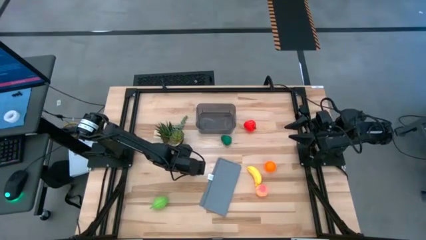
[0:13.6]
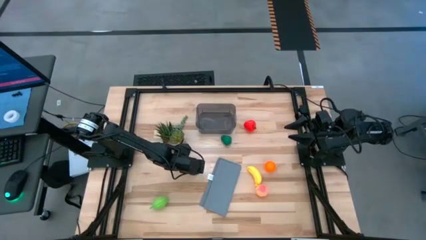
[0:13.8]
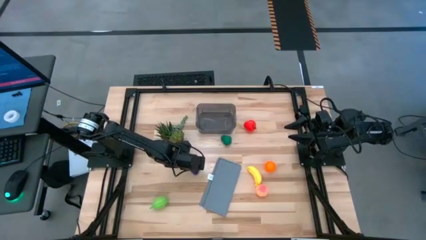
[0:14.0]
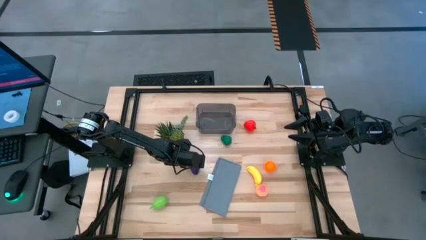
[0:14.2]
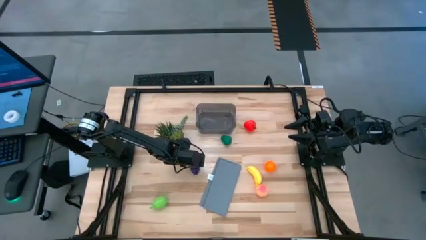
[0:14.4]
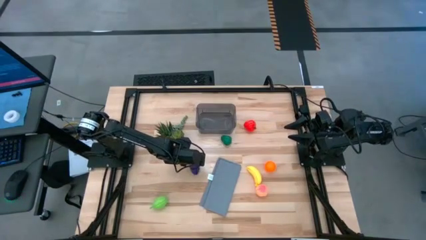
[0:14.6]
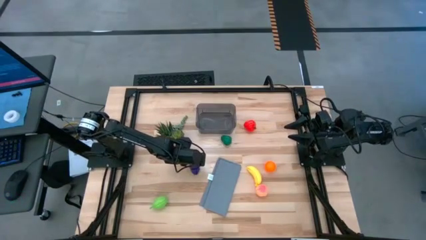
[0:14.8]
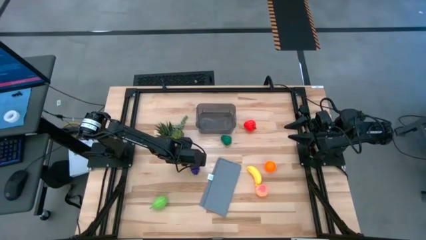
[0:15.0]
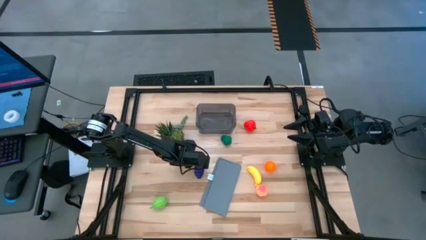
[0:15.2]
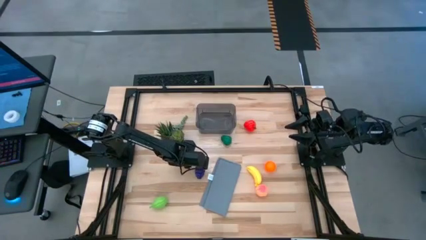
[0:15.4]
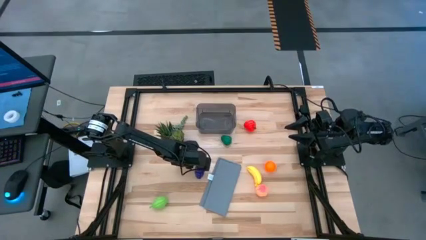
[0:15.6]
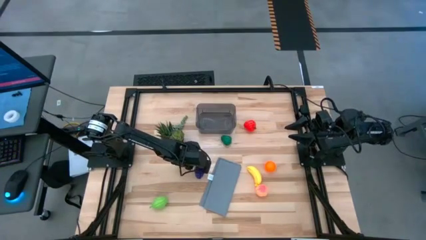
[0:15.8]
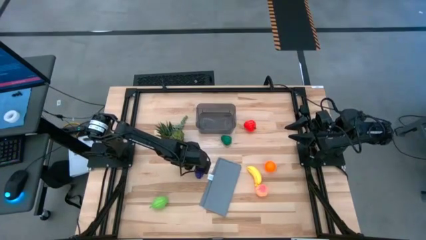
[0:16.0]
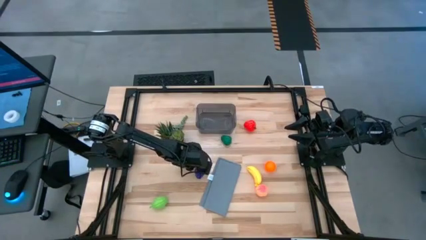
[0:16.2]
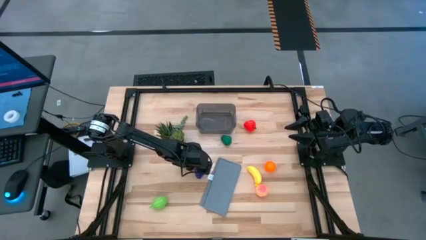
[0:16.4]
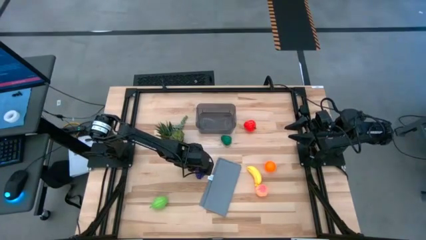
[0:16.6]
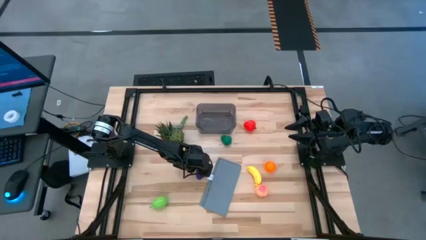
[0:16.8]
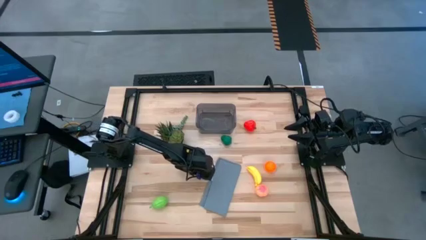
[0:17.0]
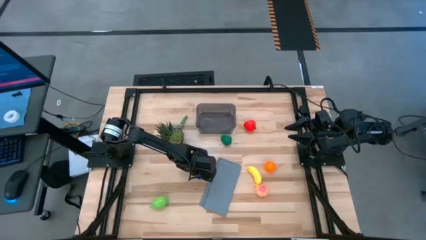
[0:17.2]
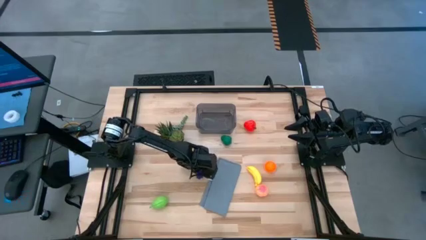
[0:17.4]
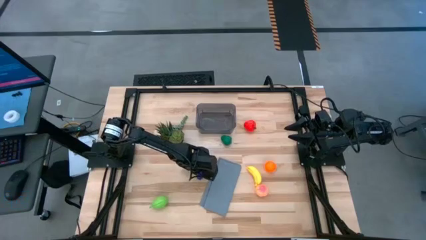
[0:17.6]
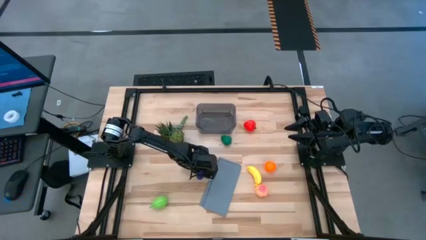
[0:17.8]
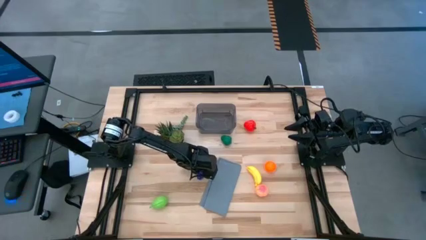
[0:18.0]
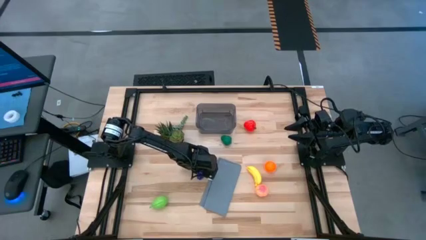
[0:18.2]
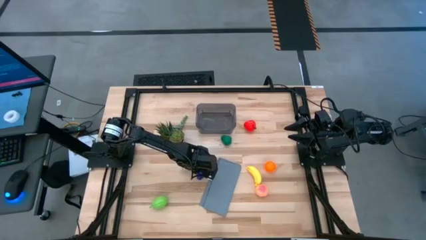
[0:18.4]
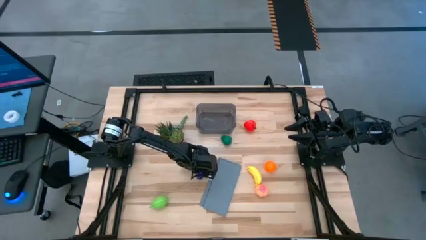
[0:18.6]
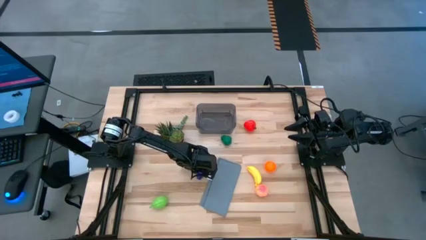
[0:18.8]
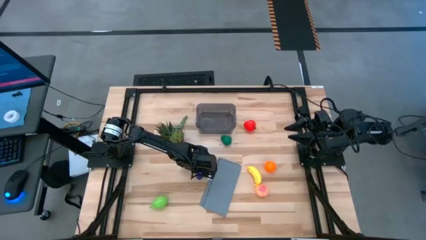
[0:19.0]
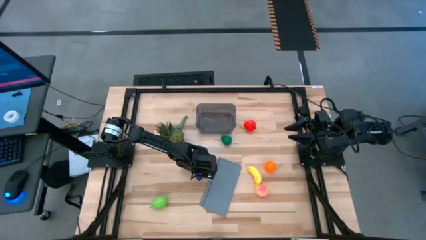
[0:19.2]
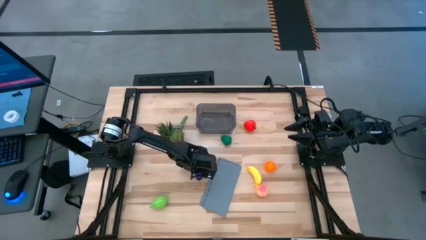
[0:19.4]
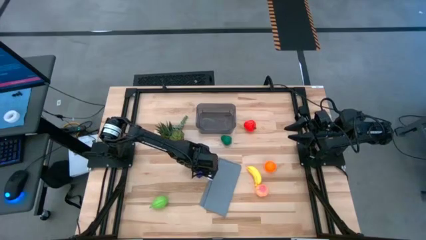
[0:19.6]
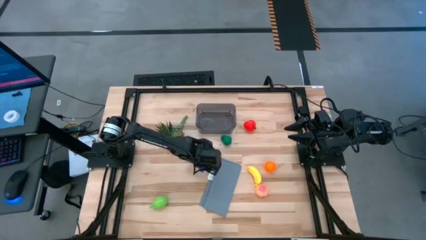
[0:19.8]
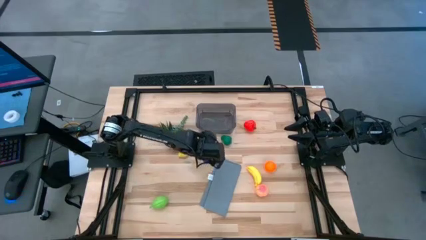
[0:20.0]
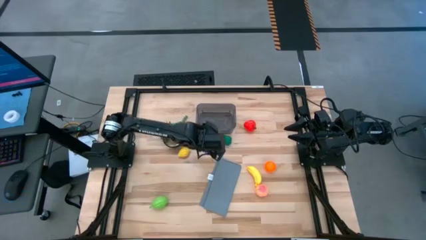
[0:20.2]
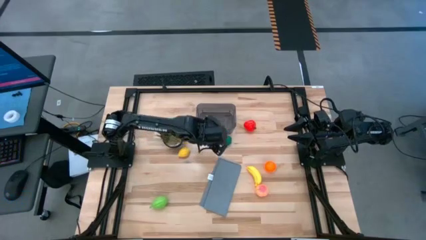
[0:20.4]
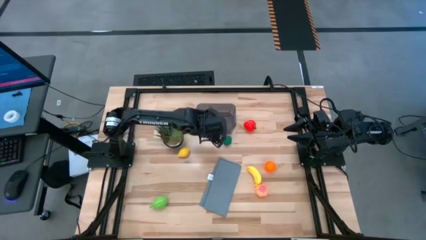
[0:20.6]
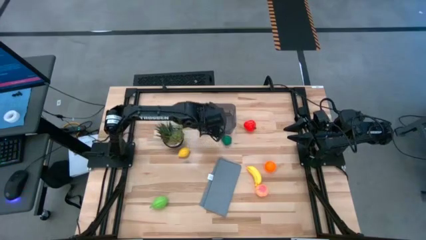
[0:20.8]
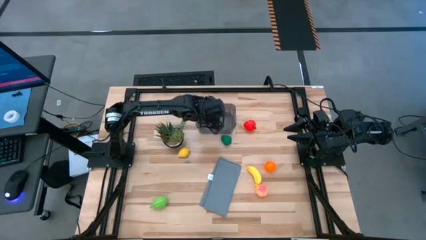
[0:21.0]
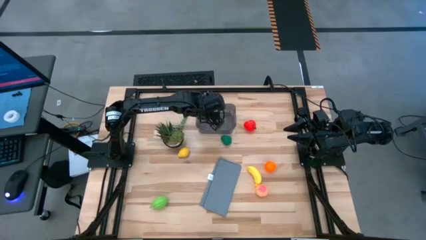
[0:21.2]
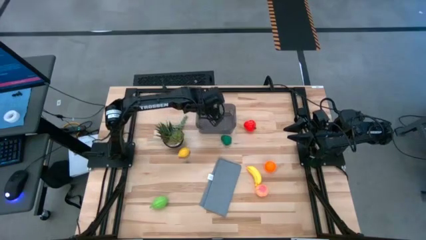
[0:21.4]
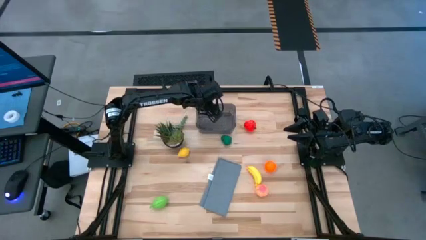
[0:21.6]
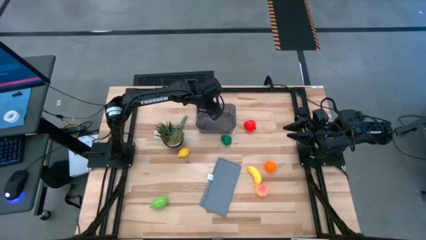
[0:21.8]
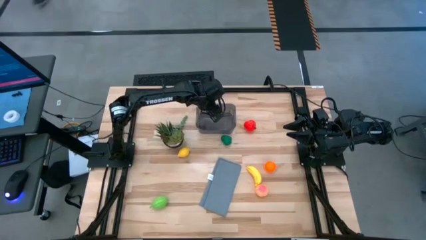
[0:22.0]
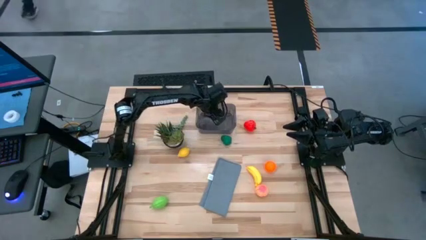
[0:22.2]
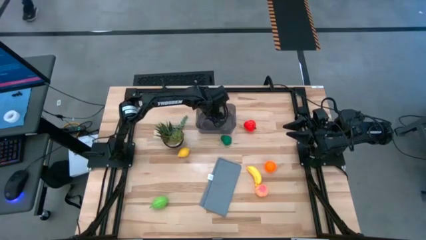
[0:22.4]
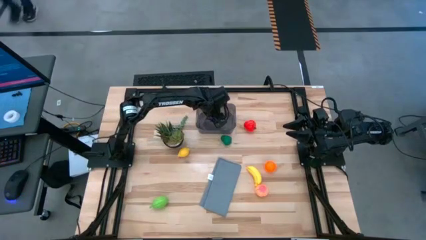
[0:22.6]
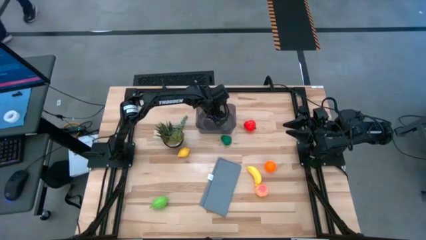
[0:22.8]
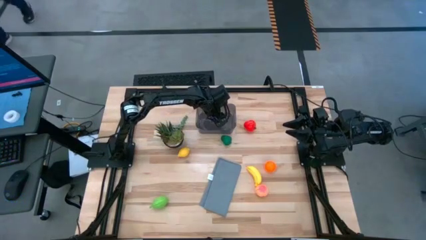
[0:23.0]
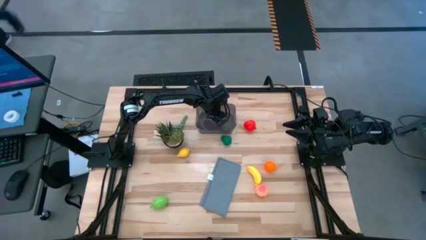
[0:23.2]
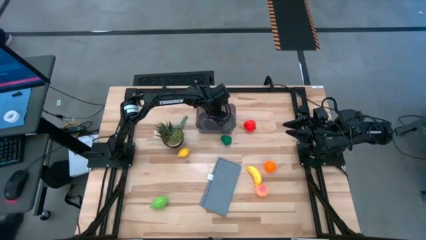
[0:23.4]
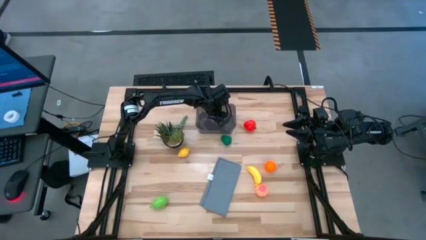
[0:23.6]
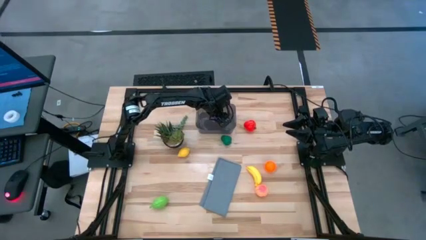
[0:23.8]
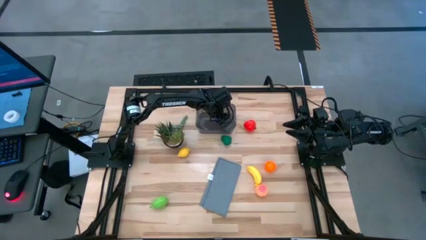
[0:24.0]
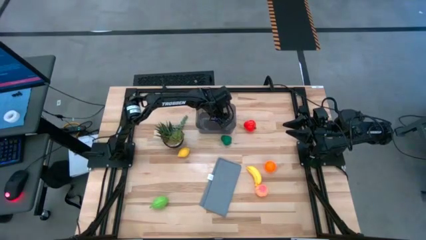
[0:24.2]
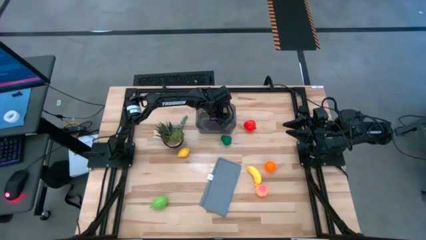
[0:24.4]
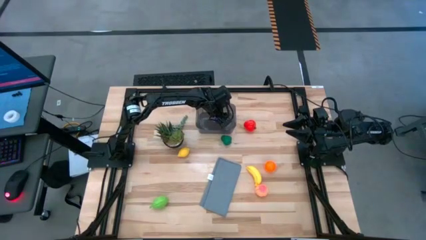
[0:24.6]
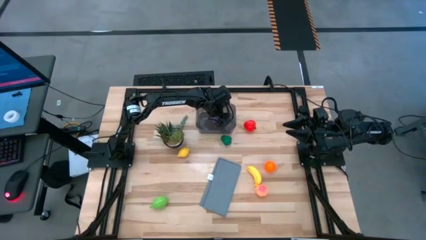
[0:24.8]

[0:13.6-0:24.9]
Task: Pick and placing Produce into tupperware
Put the grapes into the black bin
